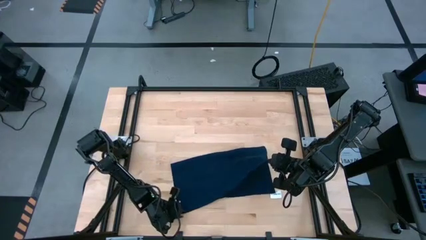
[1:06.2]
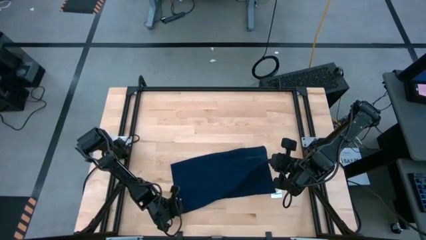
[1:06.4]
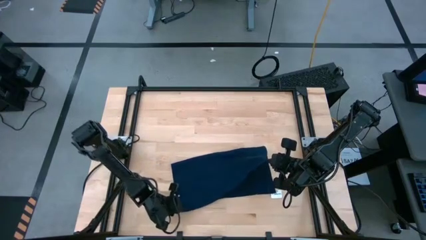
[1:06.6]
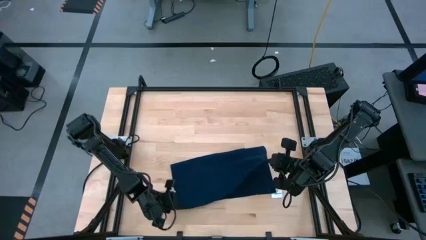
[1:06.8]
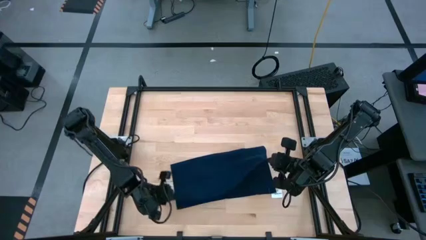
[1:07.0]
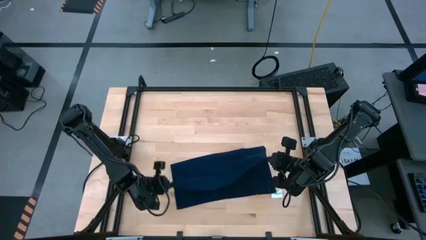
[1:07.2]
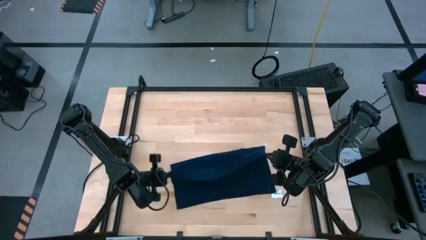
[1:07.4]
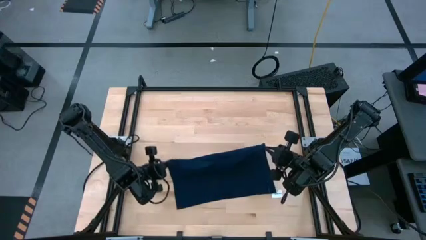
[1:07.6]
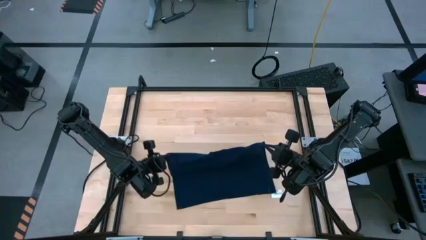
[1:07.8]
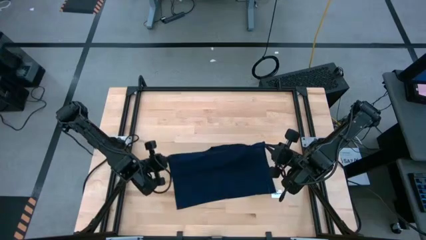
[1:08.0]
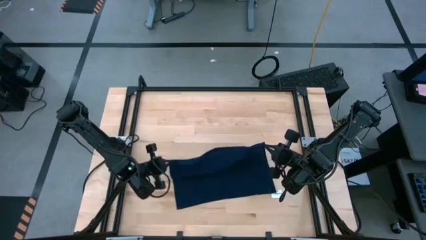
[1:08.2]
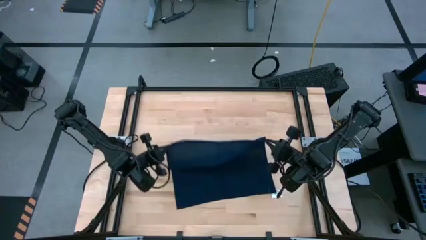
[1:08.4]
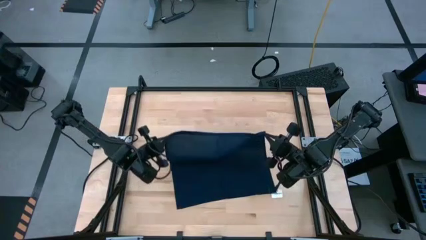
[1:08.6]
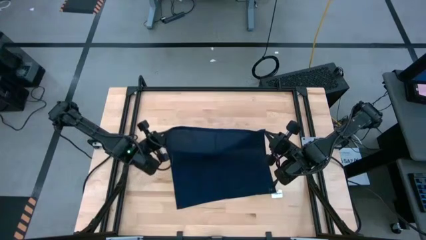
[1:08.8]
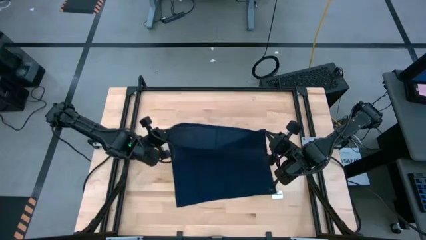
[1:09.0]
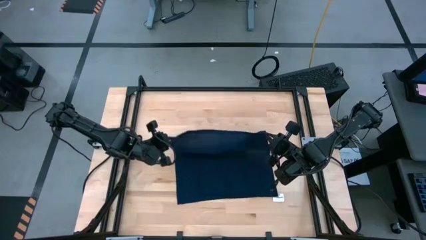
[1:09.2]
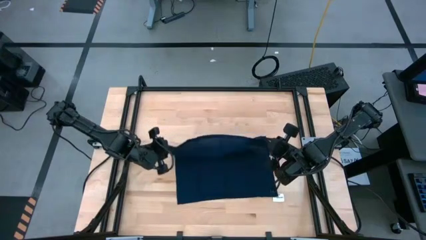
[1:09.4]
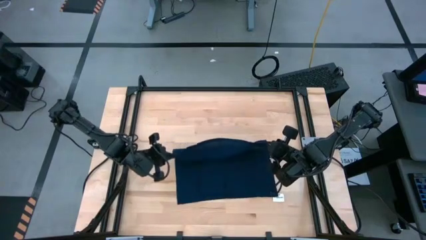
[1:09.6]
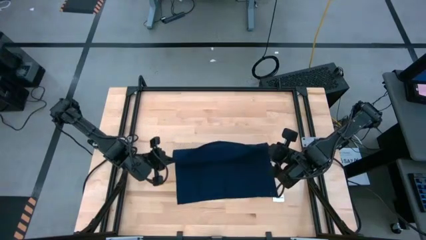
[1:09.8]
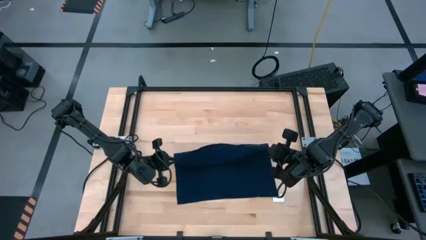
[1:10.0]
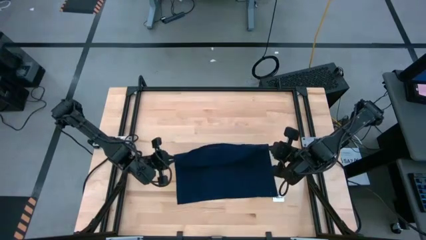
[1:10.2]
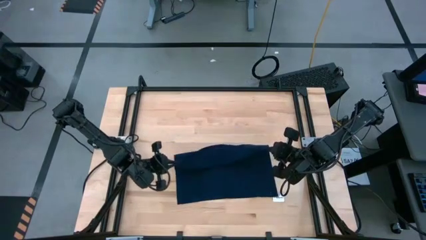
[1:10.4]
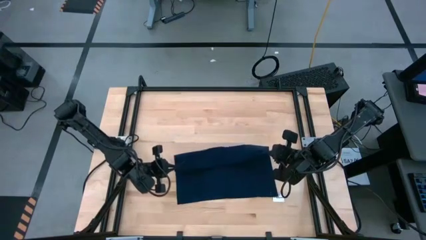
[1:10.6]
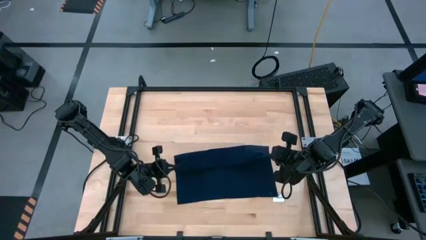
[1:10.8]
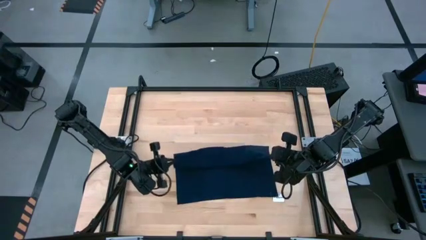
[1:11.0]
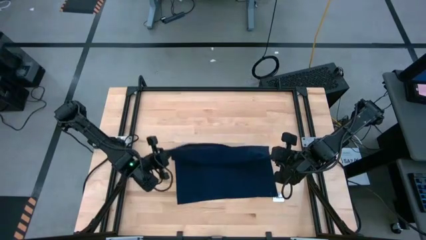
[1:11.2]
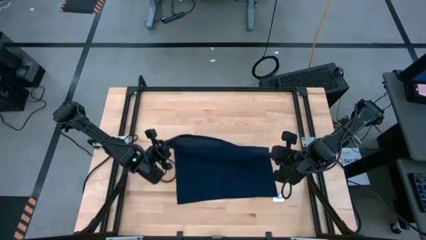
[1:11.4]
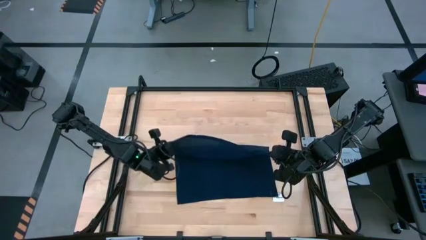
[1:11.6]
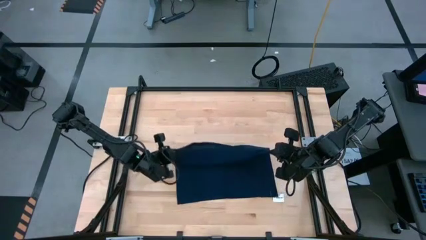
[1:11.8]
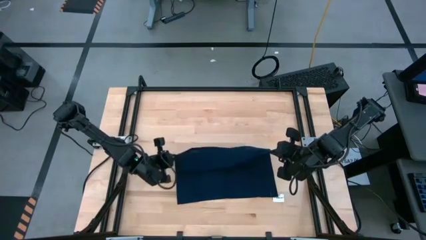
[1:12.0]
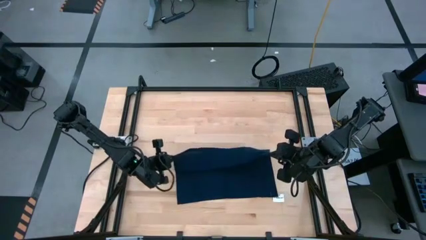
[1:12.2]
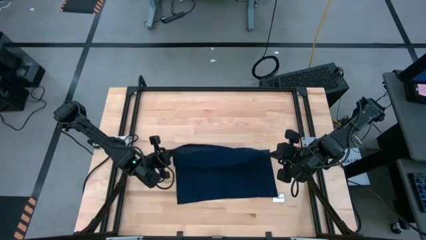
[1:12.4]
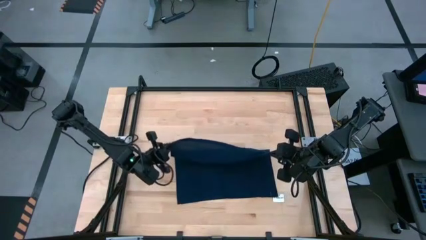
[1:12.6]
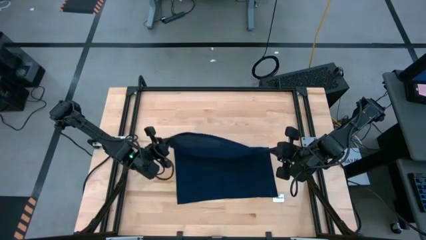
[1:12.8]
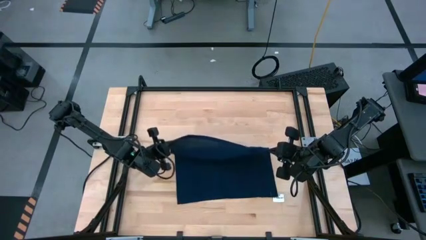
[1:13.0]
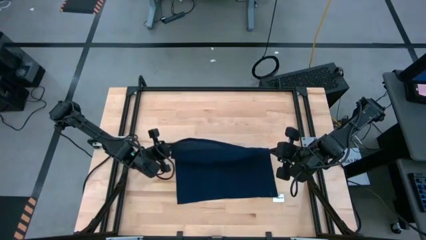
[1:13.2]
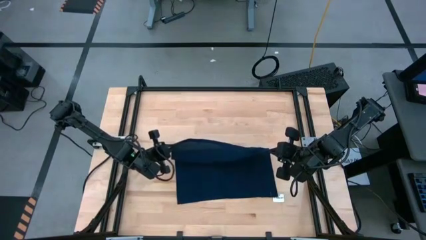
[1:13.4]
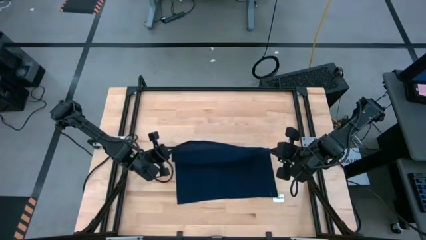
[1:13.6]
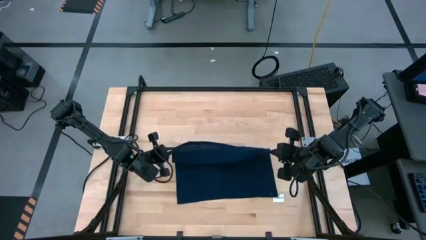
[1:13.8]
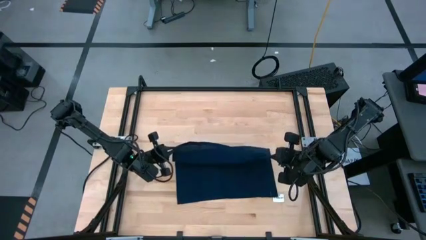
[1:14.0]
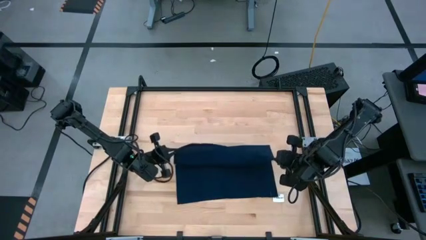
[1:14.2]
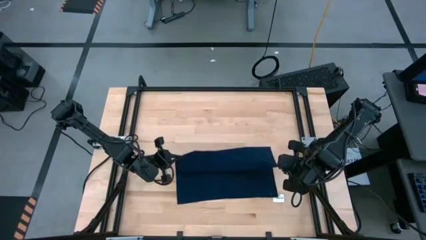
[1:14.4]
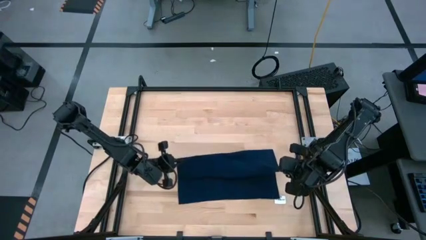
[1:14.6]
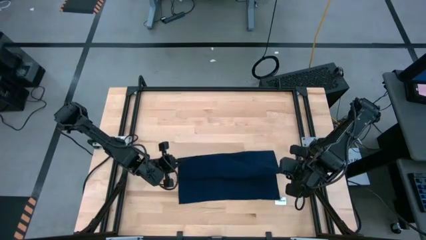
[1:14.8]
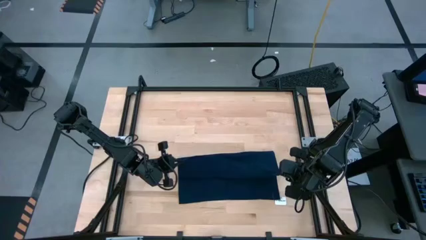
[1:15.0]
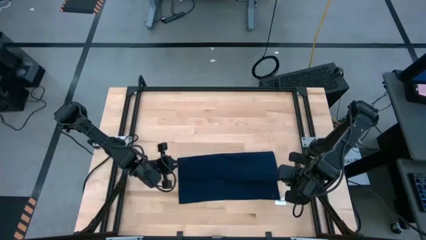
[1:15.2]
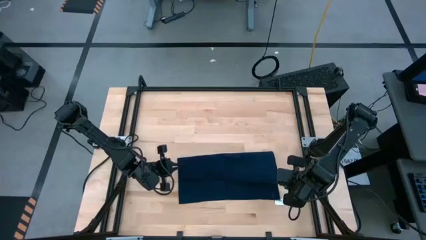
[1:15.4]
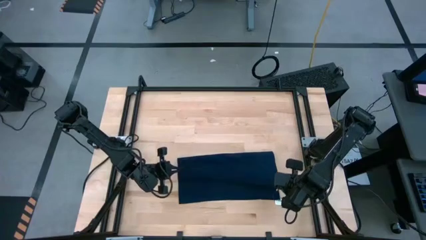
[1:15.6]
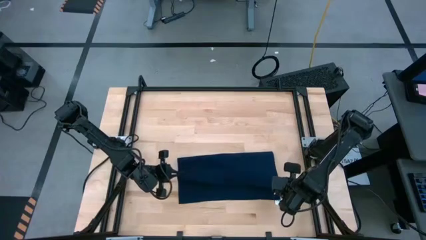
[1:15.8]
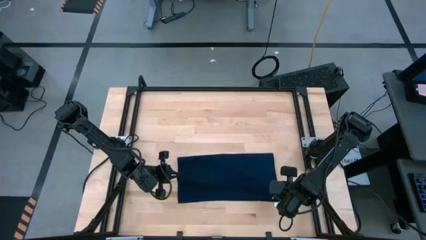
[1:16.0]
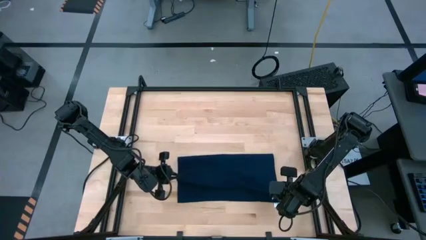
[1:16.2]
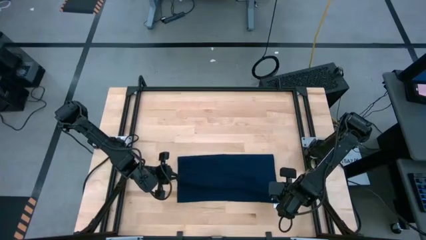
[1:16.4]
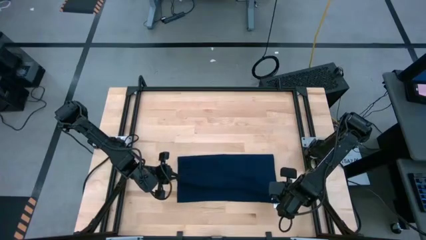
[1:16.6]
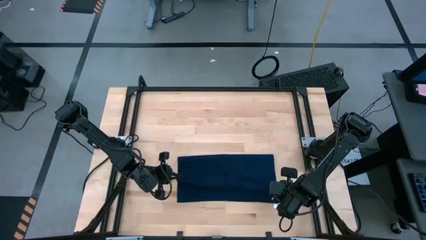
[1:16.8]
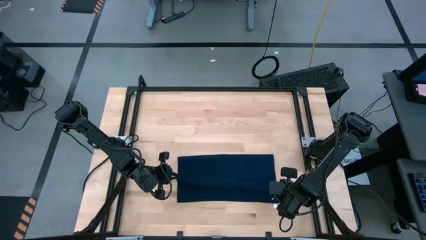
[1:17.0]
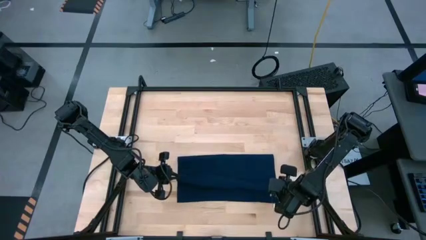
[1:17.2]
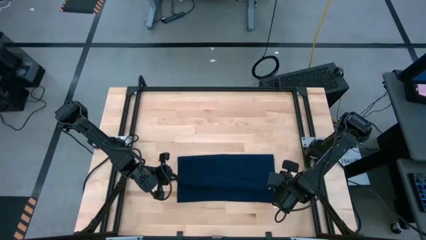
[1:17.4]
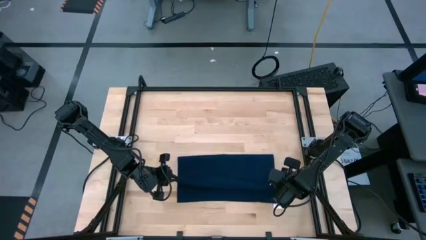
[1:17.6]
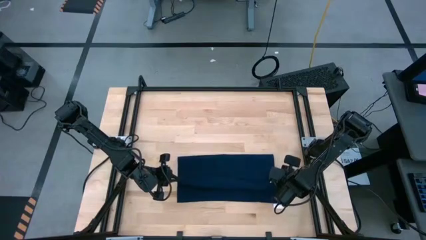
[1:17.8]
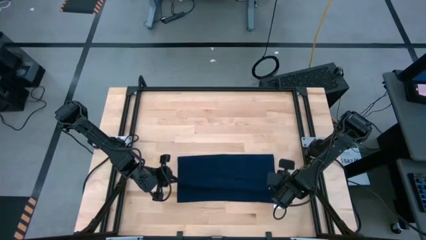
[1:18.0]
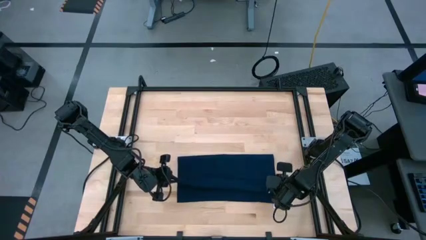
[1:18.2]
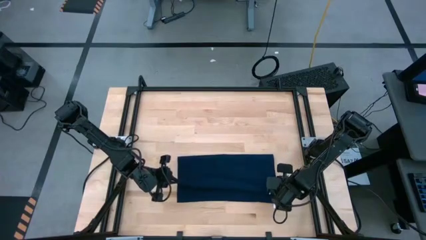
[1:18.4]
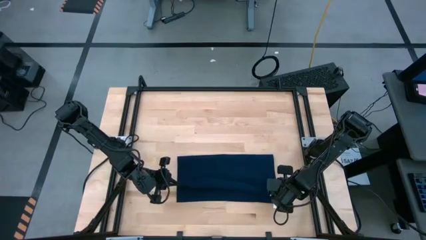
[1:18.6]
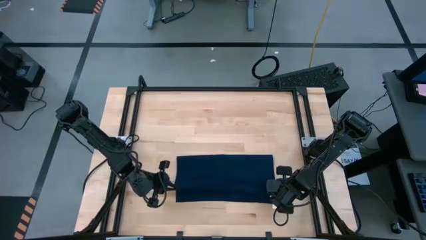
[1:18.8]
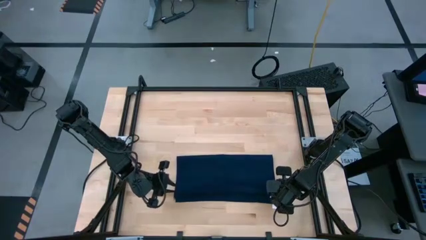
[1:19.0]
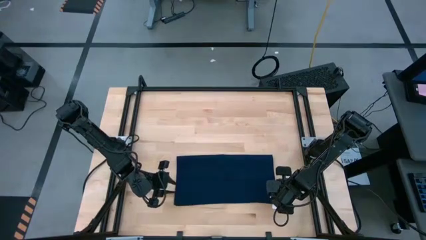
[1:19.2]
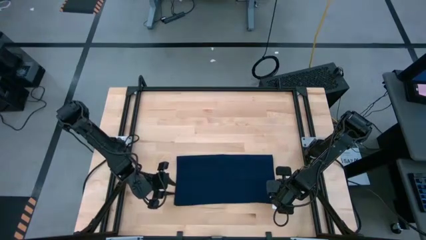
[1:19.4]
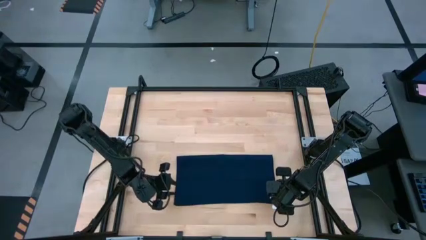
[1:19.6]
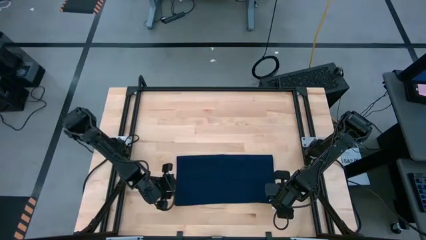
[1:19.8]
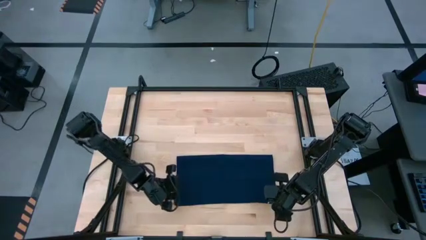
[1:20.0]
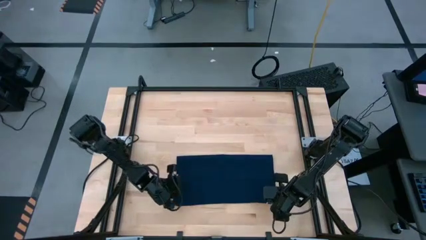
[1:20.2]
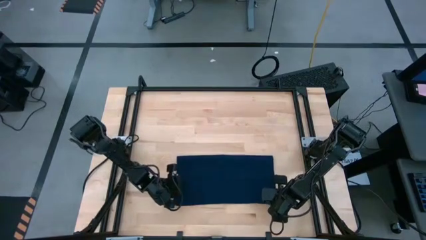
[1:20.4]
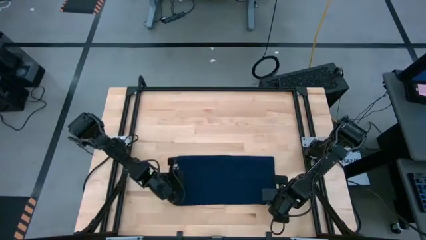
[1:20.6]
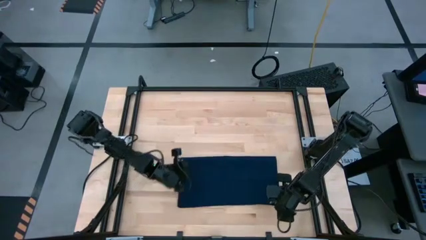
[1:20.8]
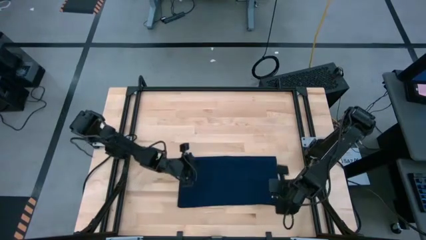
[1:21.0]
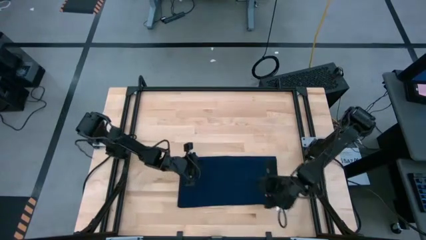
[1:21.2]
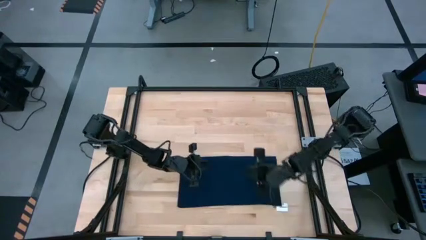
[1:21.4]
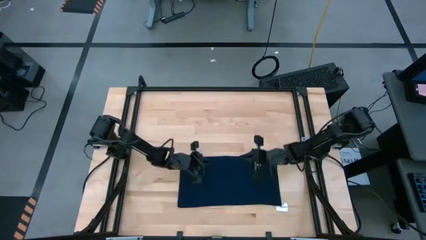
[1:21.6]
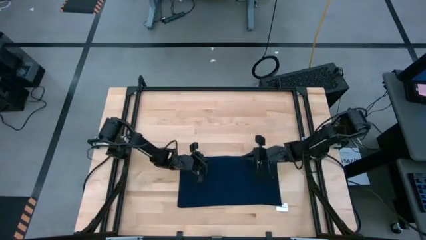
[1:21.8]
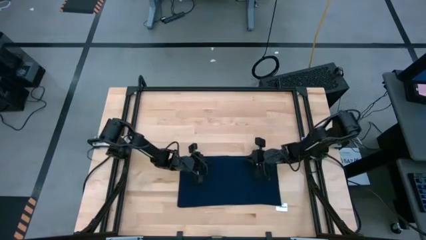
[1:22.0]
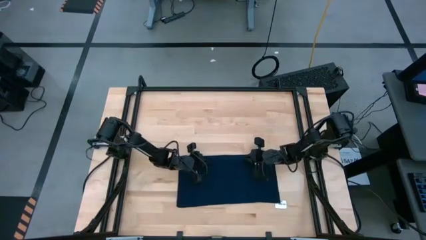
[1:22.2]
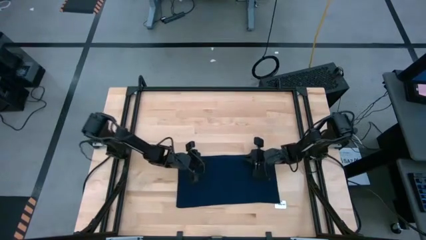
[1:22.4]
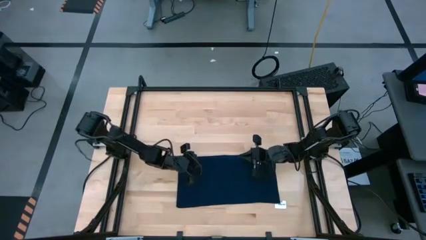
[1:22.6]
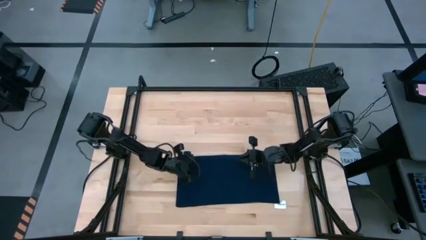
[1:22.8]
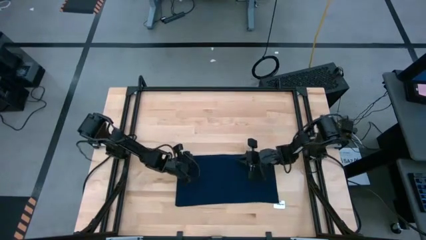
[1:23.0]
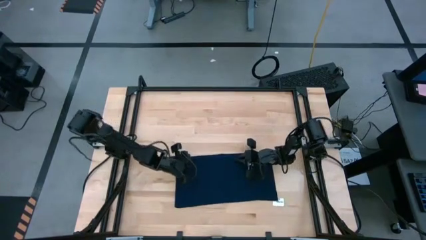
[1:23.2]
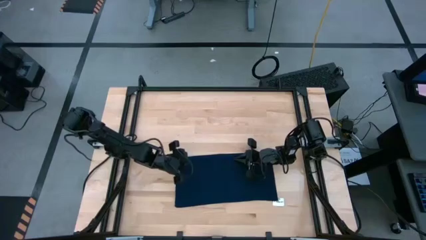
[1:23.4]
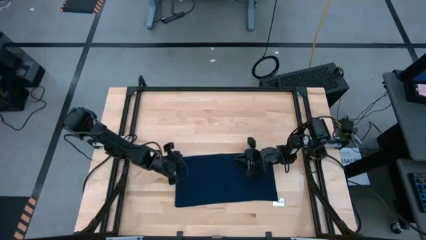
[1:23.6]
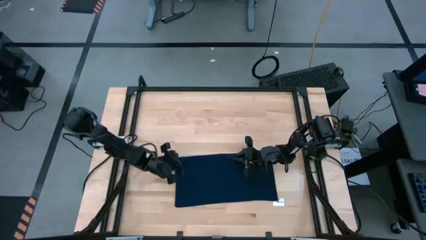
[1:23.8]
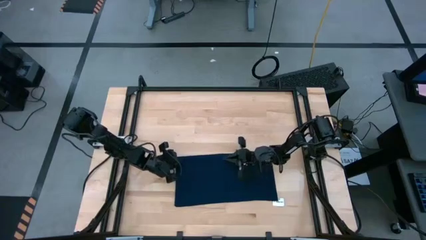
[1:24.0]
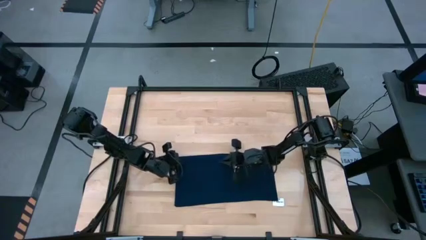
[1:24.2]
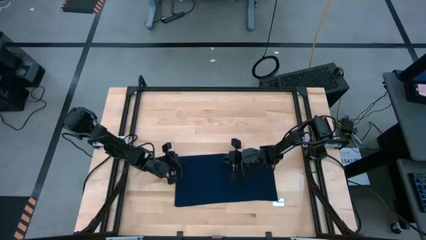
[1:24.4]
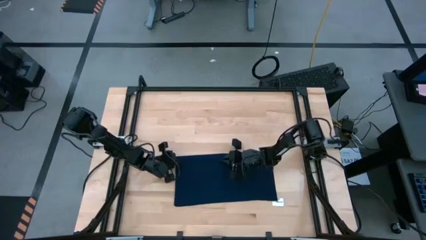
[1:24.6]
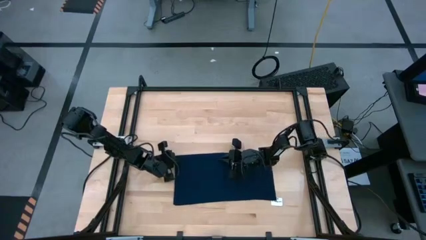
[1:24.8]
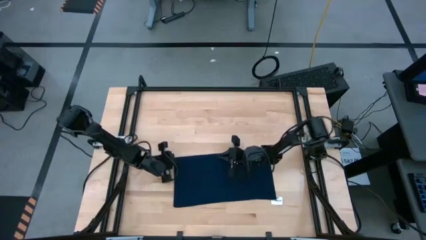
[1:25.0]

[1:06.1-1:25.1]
Task: Roll towel into tight, uniform cylinder
Roll the blue cloth napkin
